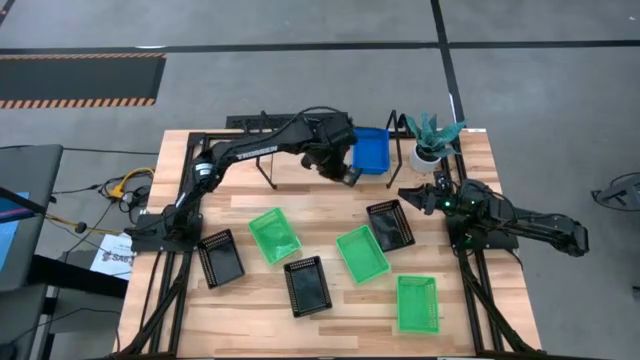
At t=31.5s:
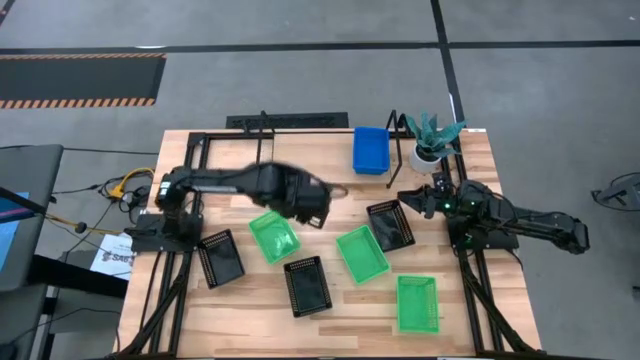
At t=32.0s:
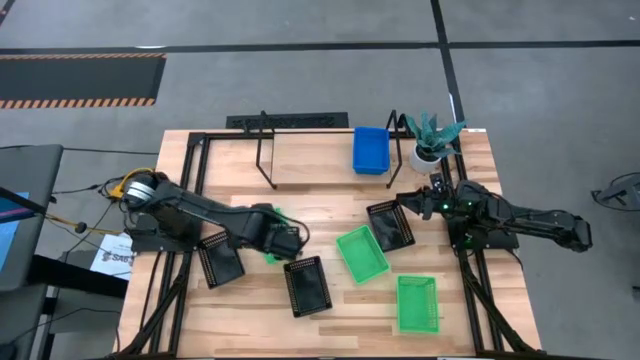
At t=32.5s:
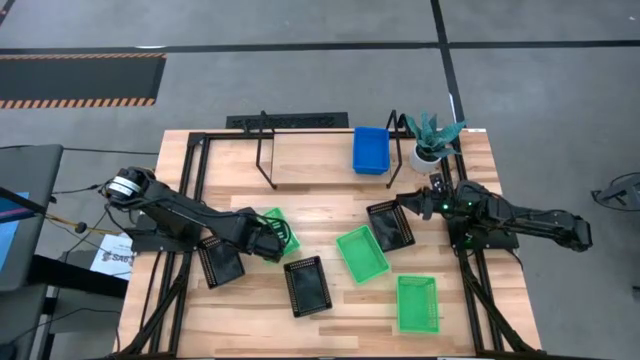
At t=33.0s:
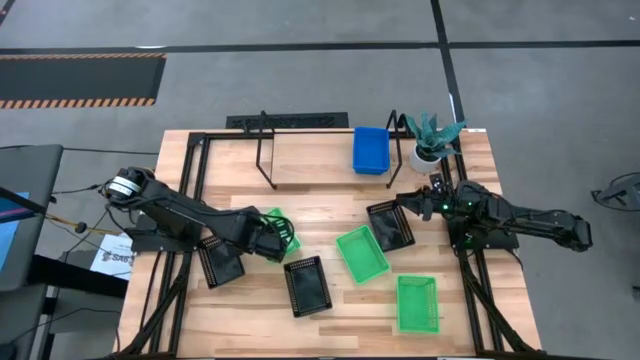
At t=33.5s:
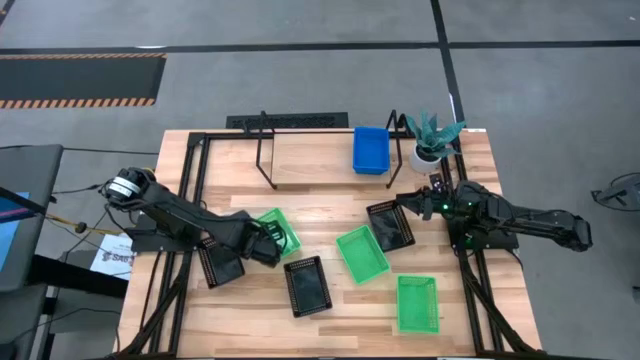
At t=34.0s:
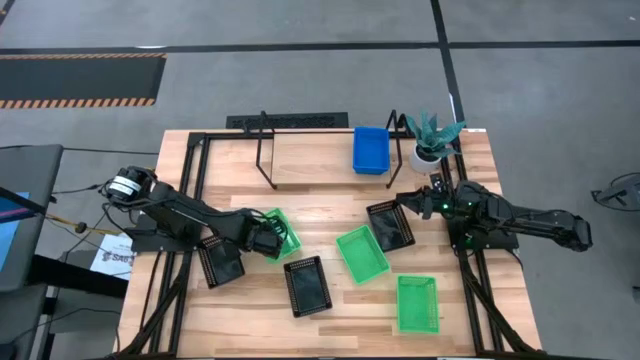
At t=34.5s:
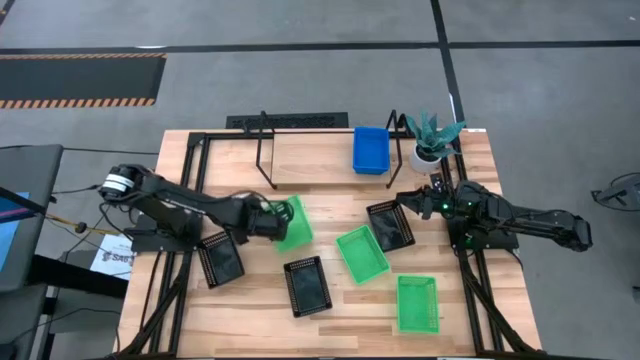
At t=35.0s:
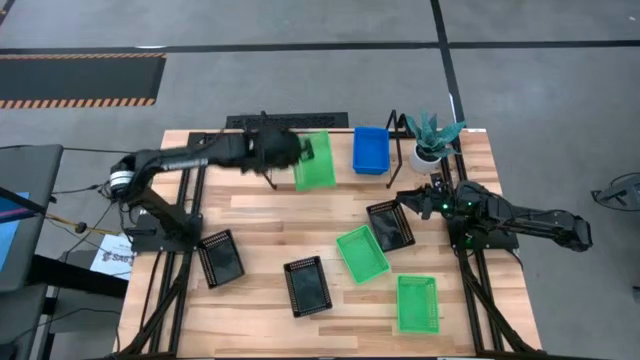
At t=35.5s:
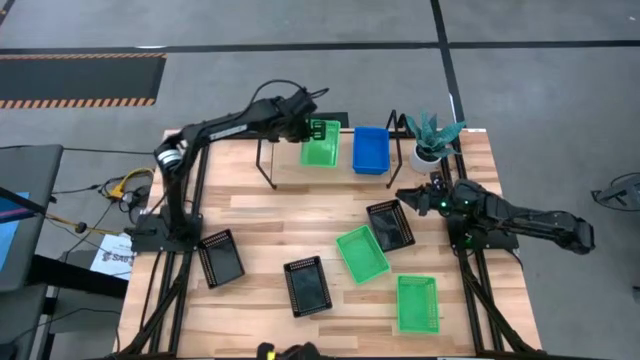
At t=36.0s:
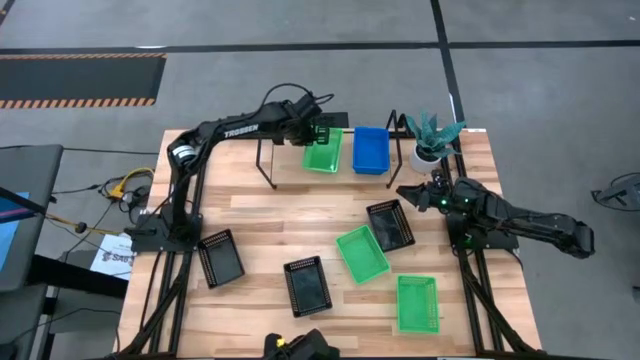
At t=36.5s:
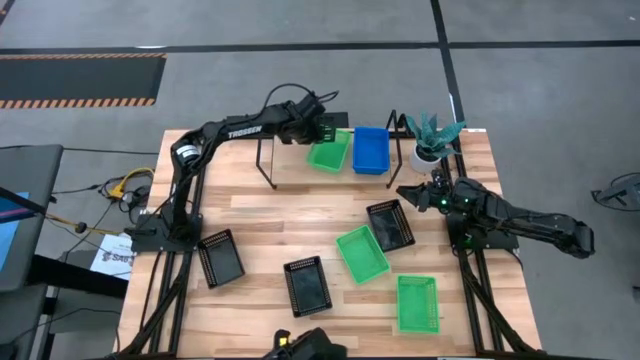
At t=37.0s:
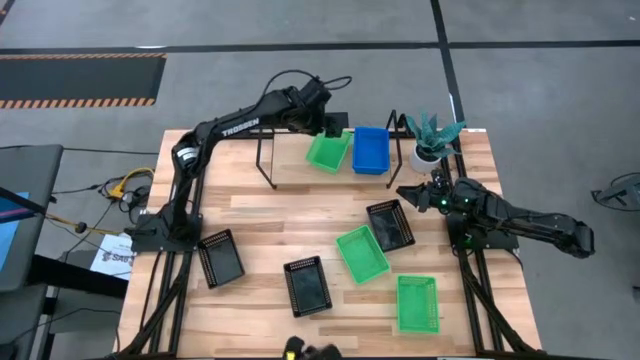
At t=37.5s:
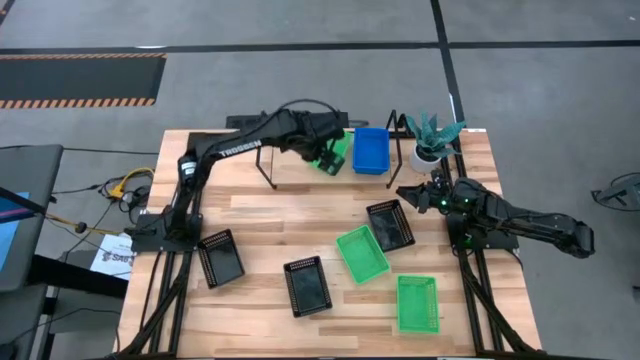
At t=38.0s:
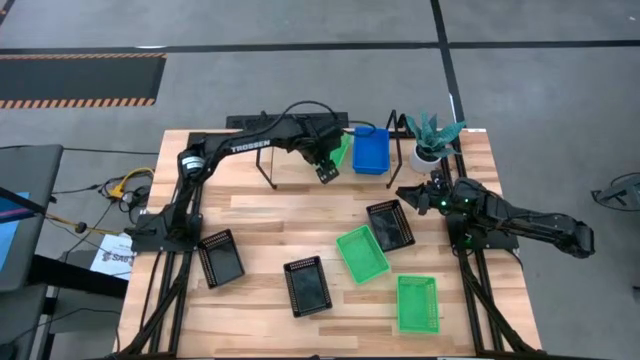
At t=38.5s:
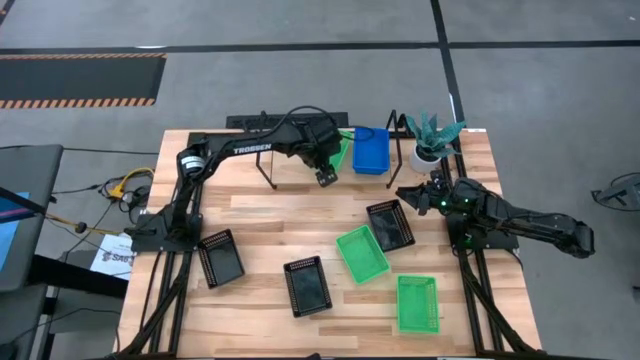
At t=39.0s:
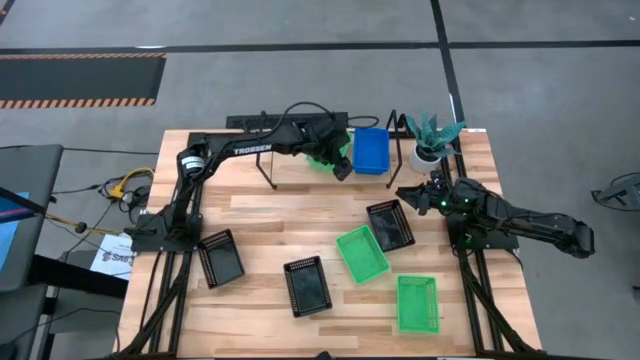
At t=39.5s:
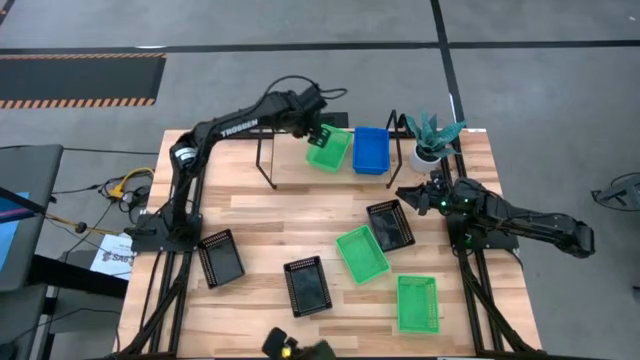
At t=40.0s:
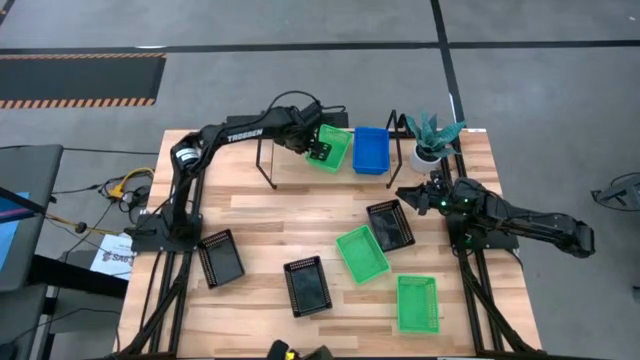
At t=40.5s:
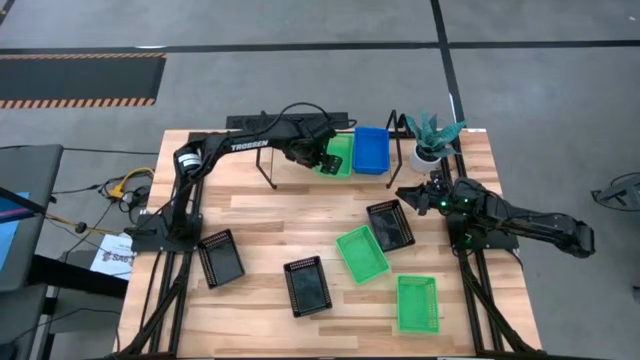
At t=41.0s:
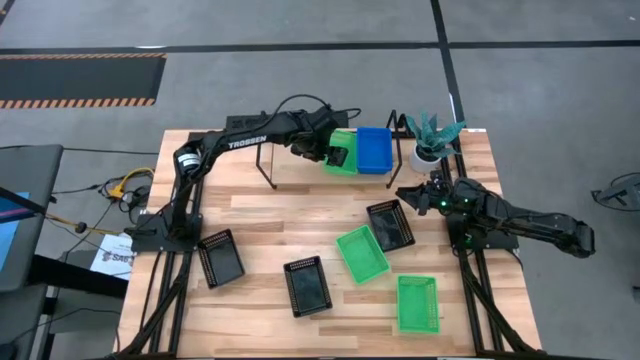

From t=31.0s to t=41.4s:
Task: Stack baskets on shelf by color
Put the top green bin on the shelf

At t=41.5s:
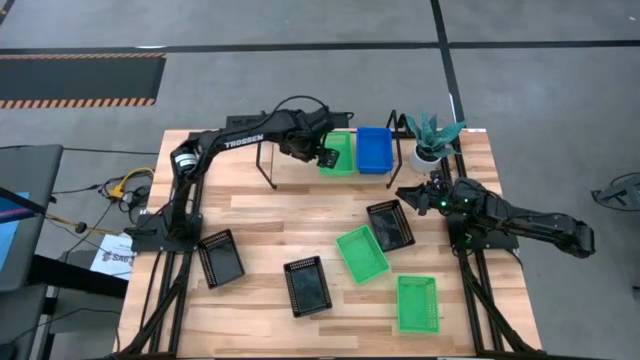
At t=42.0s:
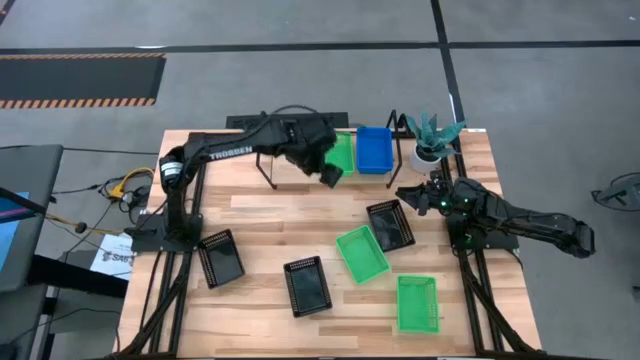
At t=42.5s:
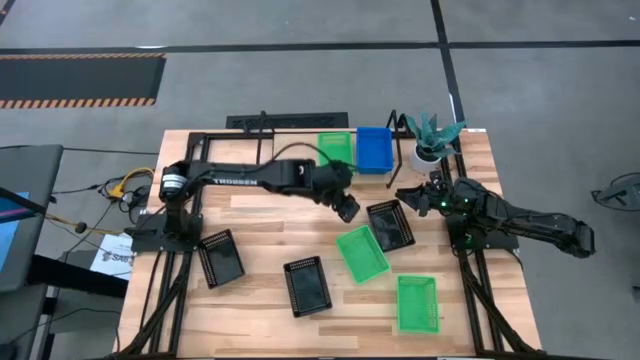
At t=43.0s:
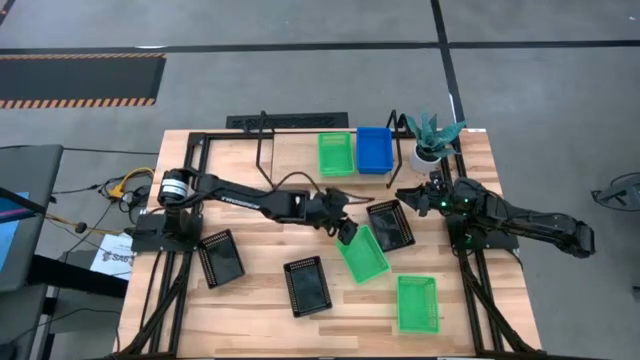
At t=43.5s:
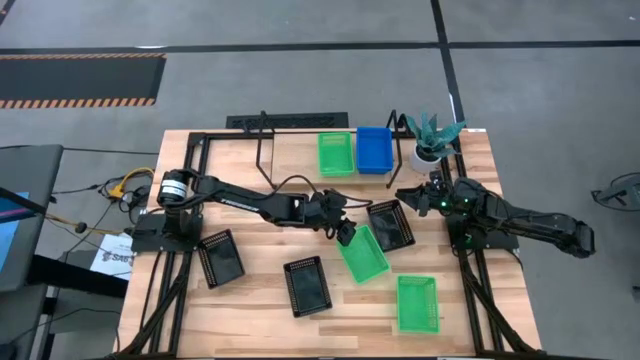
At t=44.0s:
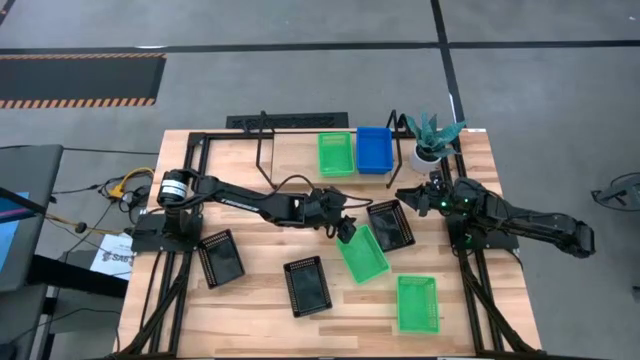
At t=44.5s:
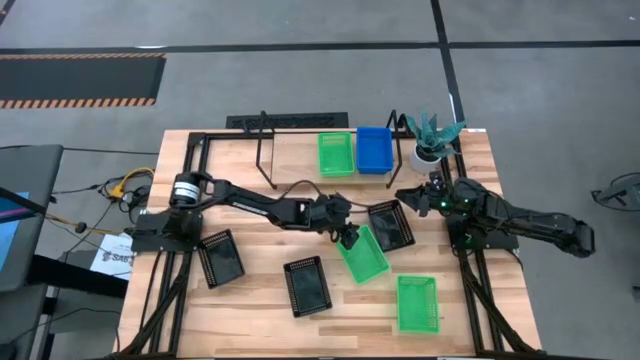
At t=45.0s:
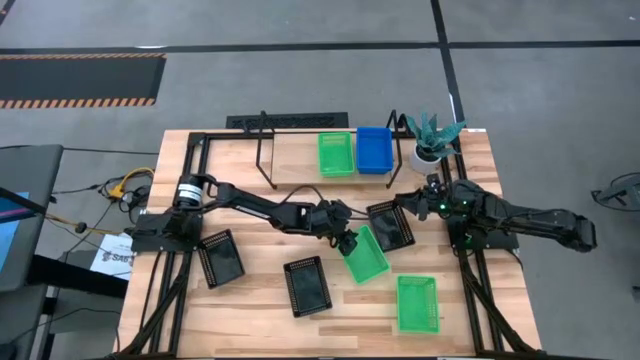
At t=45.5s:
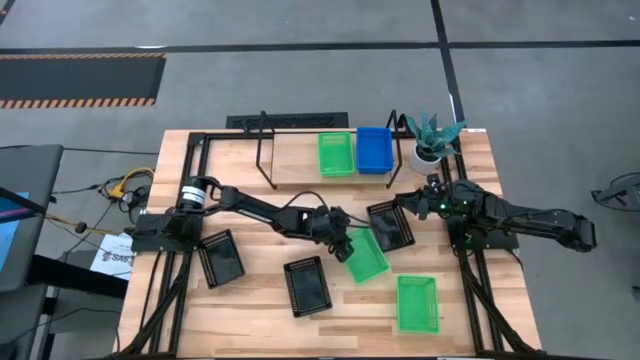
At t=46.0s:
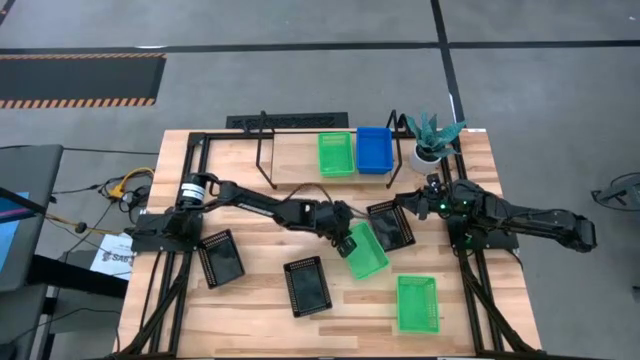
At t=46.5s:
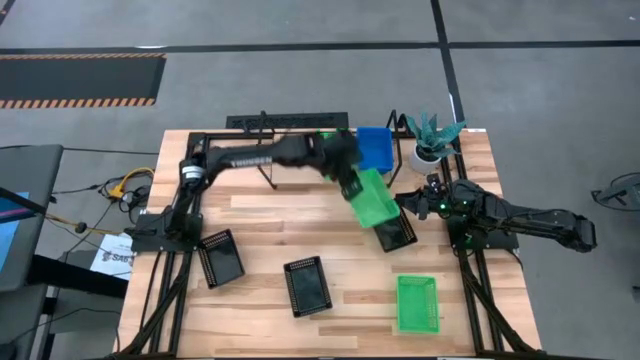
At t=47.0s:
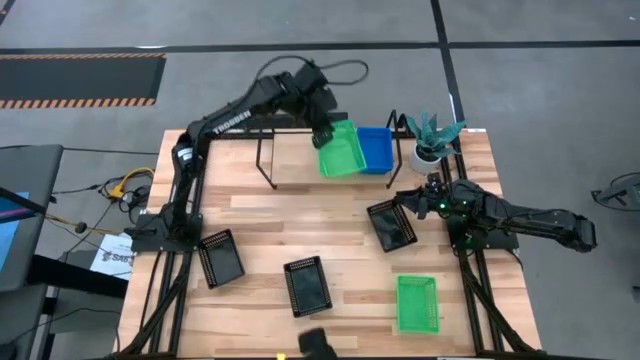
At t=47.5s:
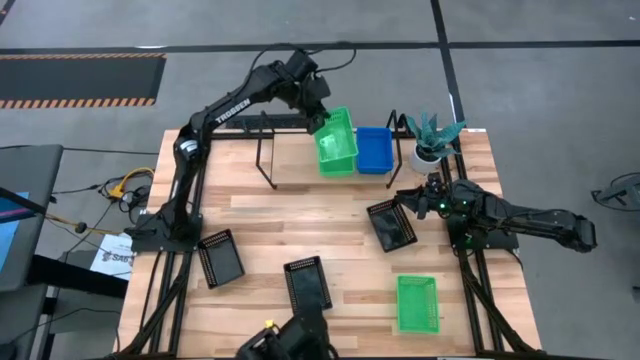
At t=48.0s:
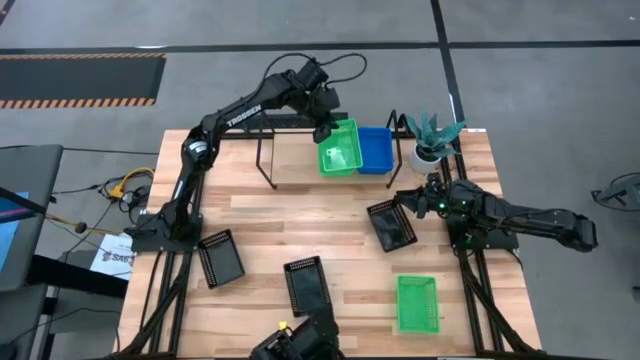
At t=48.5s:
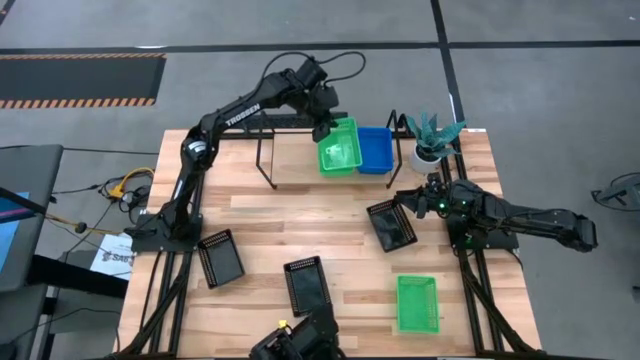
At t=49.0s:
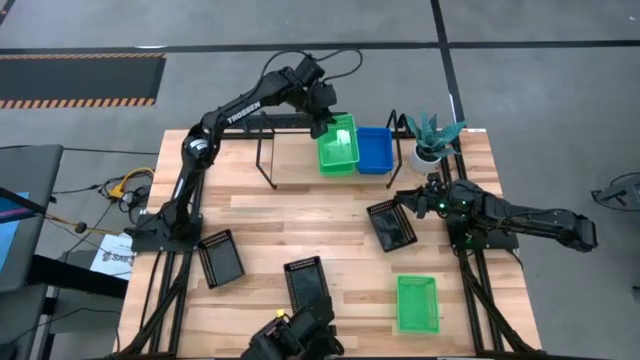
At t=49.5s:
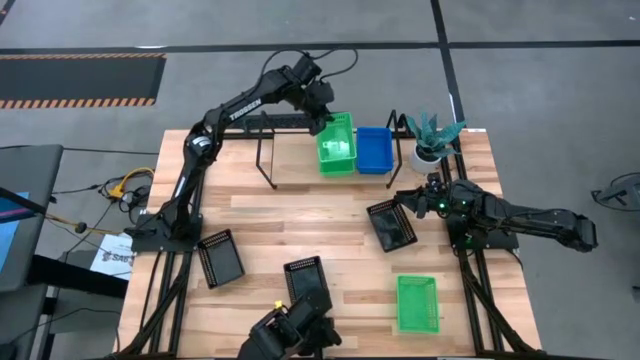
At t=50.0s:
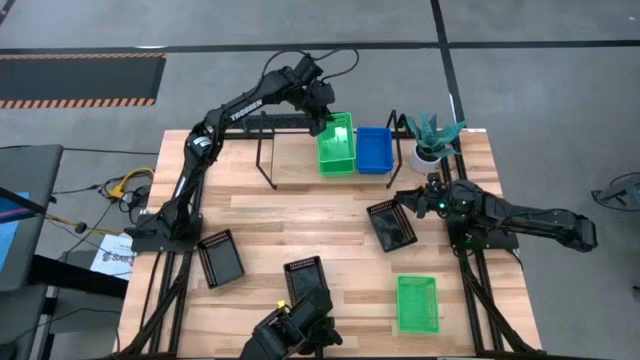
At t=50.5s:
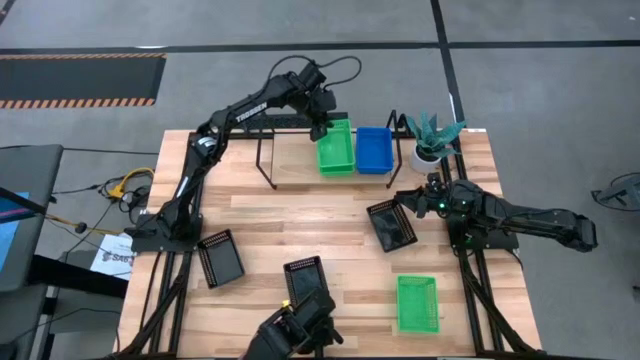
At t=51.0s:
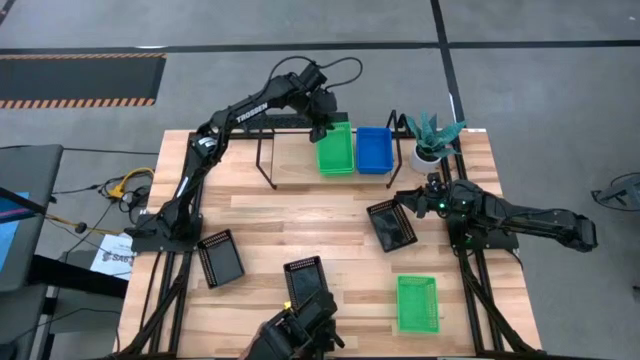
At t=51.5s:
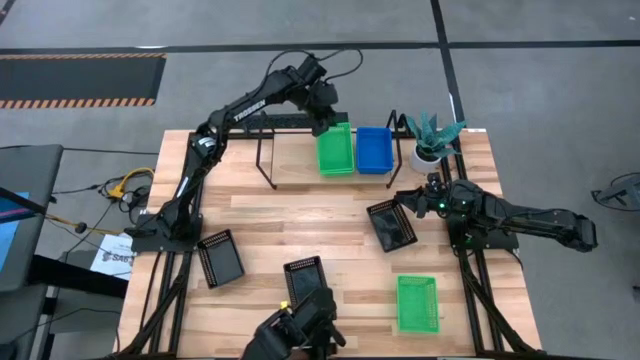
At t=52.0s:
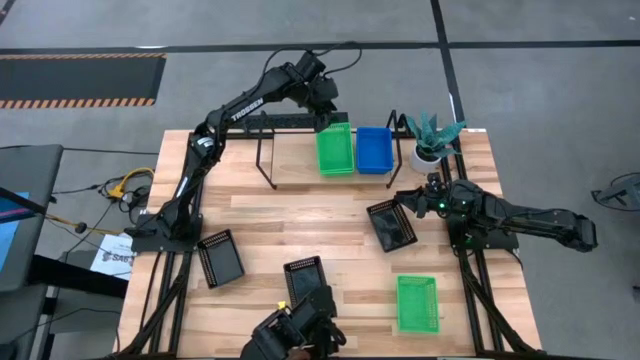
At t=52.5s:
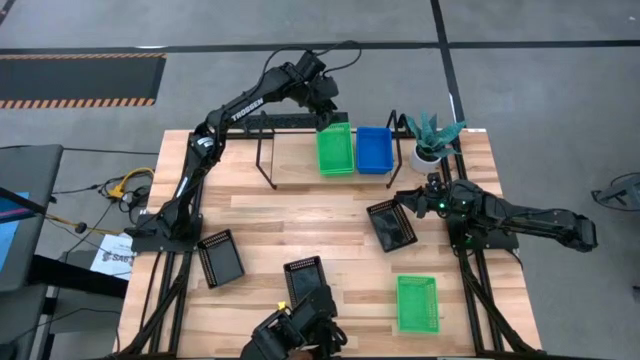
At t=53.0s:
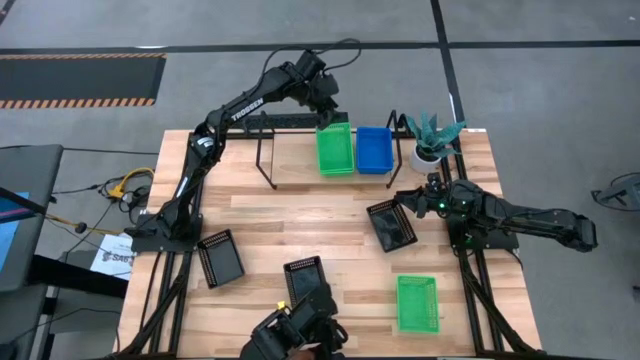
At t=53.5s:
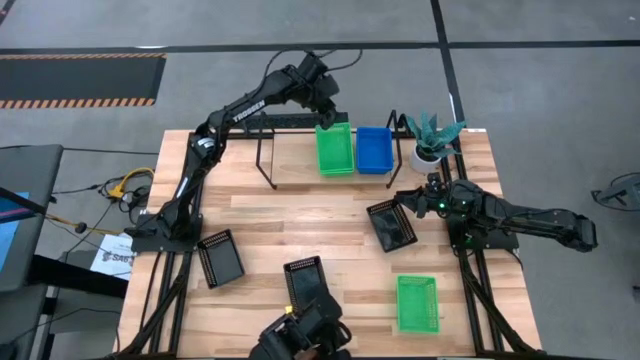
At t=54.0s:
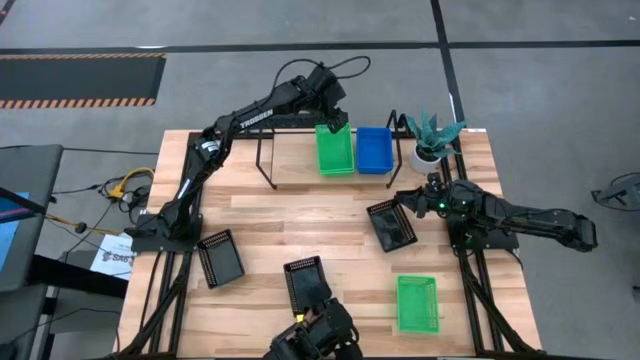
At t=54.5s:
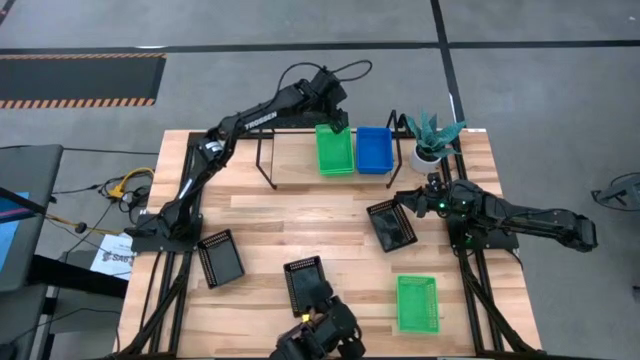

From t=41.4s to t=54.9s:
Stack the top green bin on top of the other green bin on the shelf
